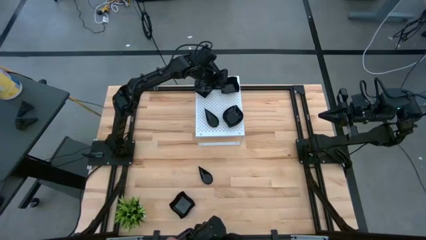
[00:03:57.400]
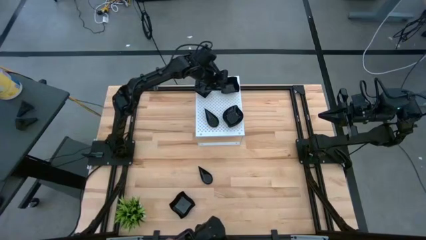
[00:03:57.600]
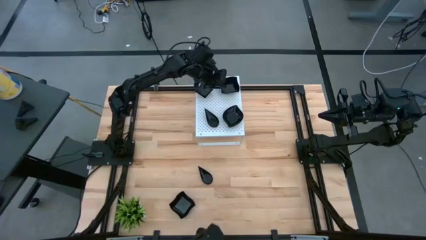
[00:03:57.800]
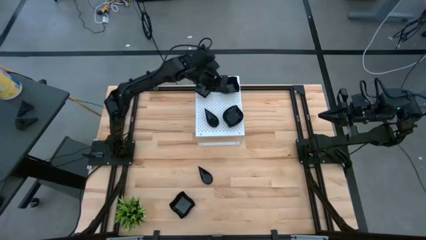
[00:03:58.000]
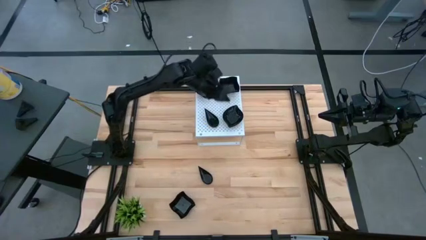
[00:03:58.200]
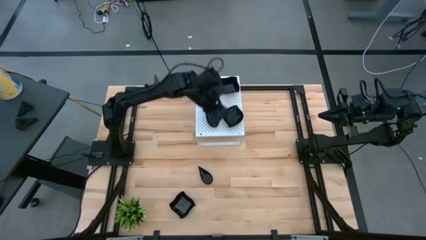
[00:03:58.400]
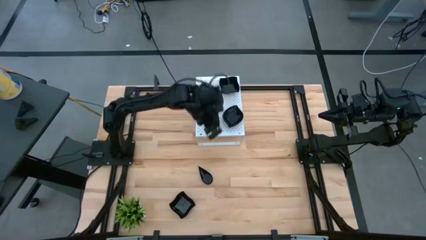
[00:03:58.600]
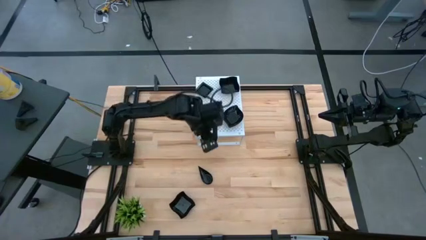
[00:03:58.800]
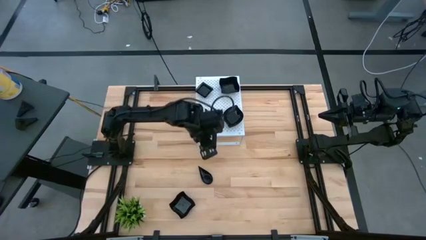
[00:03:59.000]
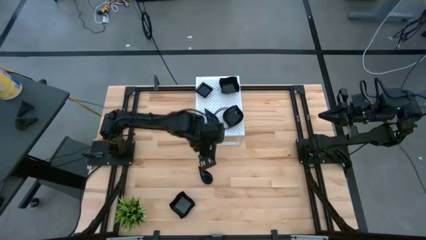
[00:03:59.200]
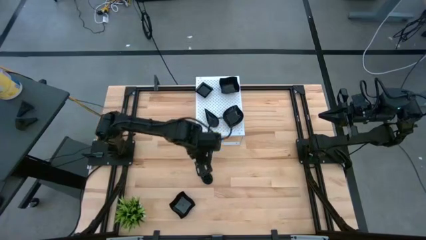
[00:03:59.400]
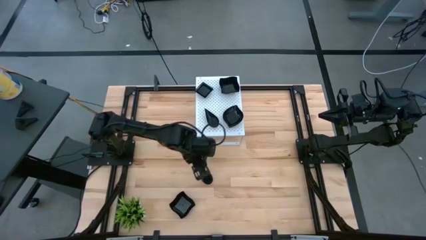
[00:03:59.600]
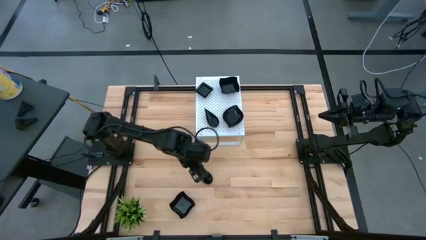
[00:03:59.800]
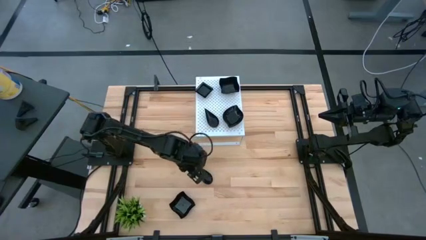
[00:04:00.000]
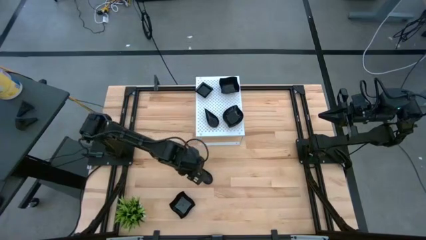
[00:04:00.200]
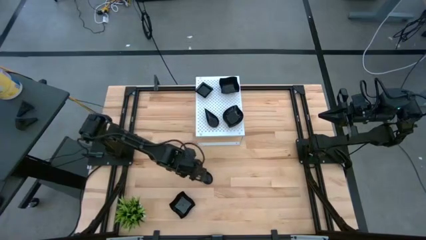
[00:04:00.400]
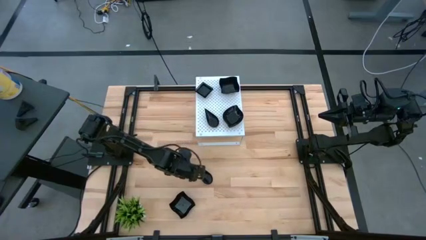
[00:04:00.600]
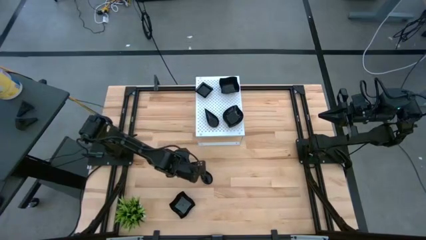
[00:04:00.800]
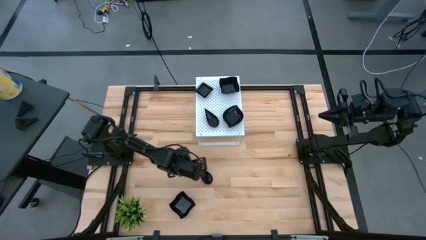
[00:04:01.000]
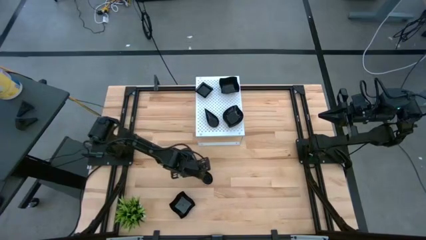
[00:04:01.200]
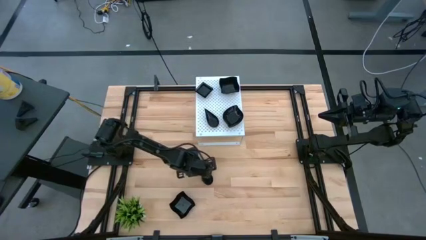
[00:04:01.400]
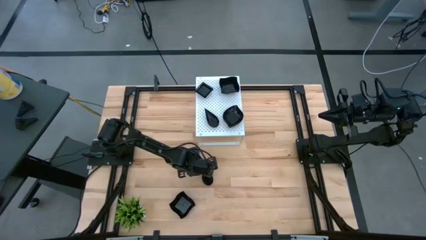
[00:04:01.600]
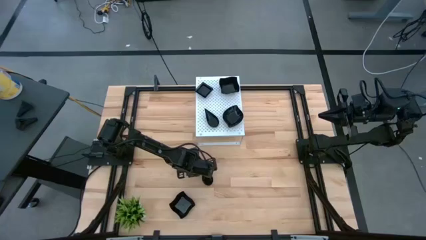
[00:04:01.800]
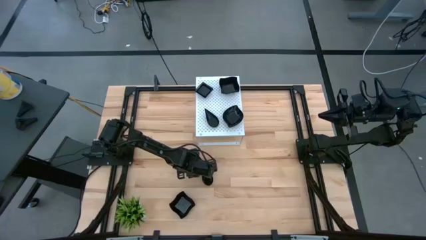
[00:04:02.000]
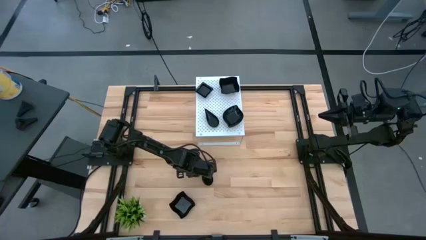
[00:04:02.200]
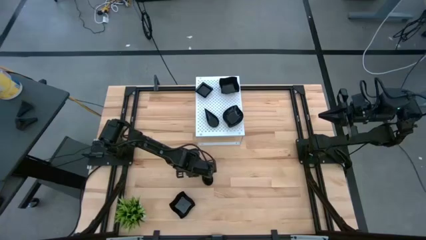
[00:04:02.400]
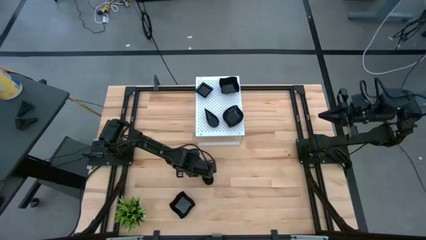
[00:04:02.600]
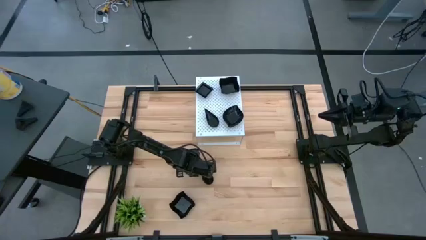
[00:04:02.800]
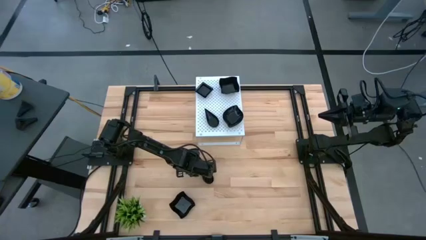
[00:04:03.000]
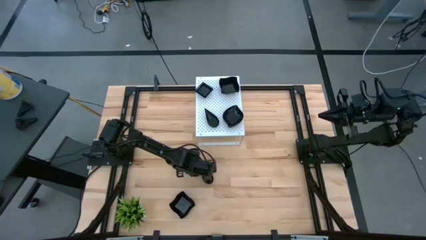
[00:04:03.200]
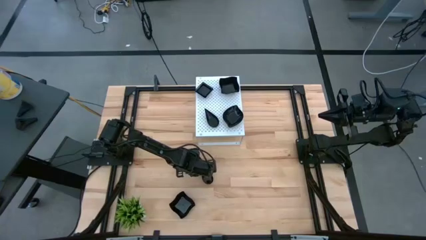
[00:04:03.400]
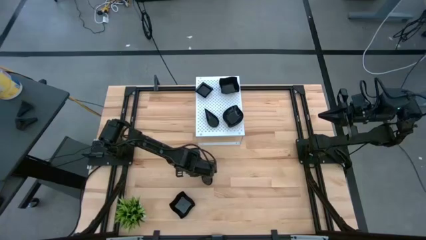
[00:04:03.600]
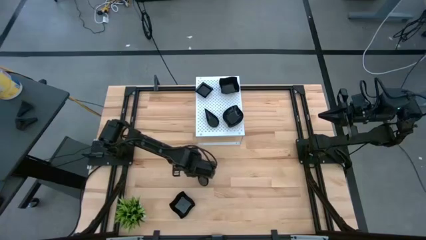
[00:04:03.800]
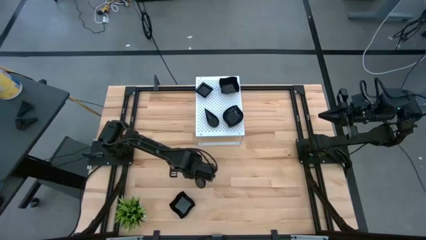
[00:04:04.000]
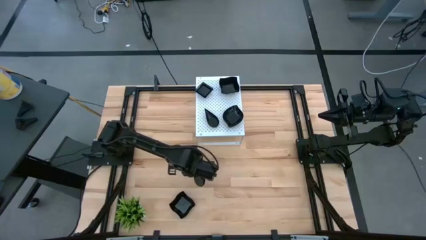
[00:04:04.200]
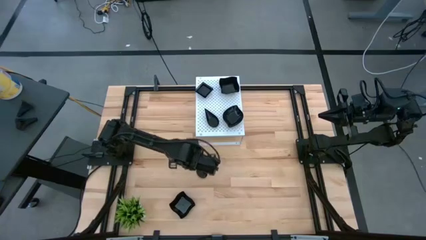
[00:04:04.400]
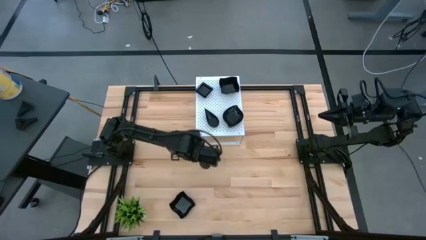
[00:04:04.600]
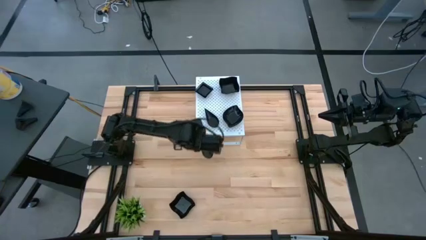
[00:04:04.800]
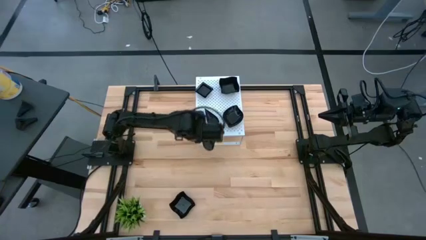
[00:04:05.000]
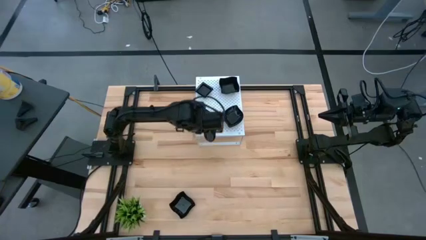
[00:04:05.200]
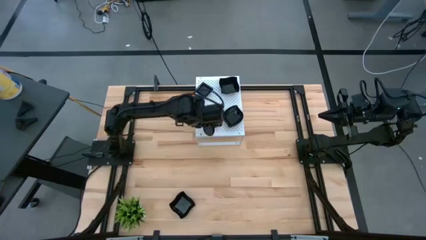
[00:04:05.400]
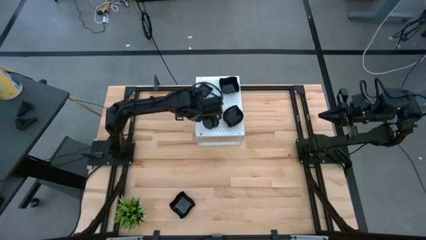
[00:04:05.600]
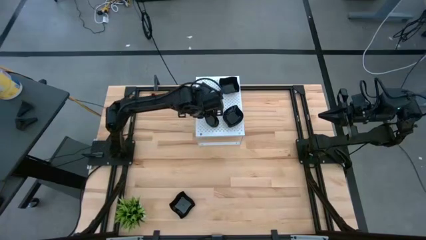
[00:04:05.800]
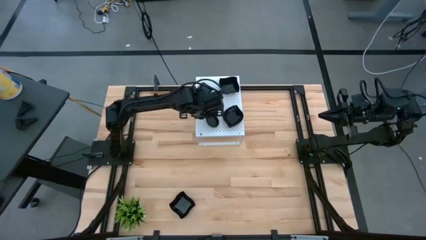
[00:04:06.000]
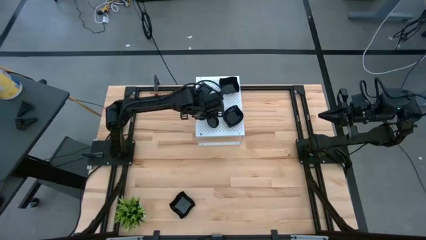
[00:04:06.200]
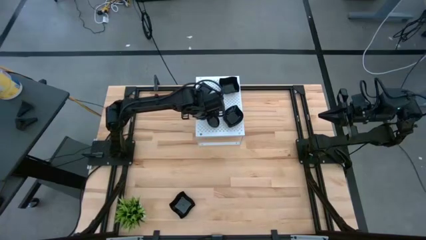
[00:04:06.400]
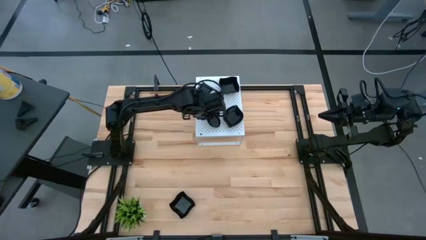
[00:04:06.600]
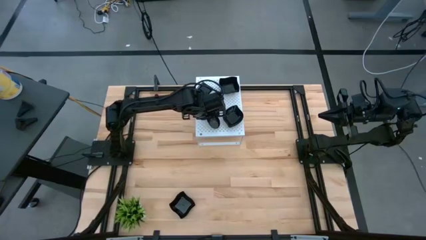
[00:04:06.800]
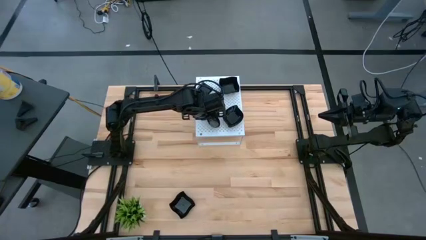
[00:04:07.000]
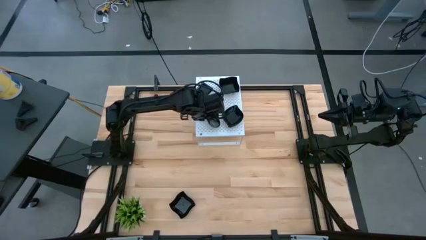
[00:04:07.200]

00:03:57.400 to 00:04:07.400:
Task: Pick & Place Mini shaped plates
Stack the drop-shaped plate on top of the drop-shaped plate on the shelf
